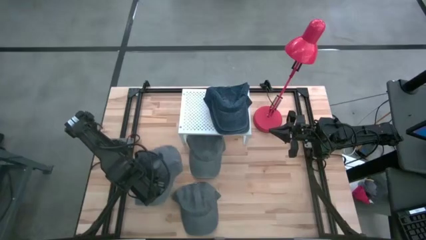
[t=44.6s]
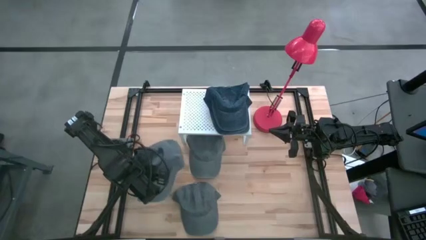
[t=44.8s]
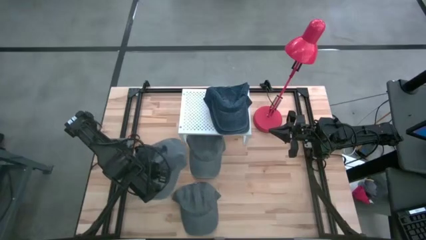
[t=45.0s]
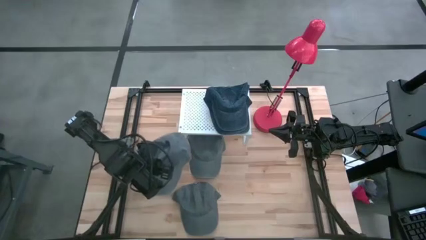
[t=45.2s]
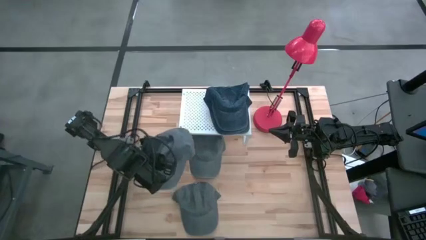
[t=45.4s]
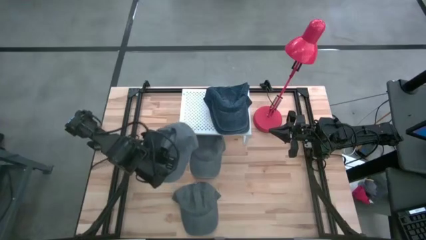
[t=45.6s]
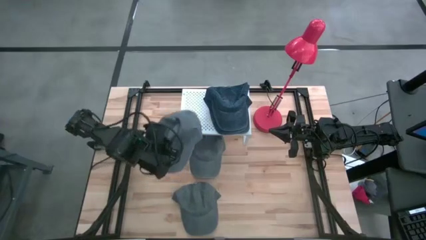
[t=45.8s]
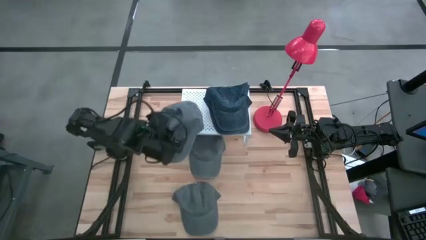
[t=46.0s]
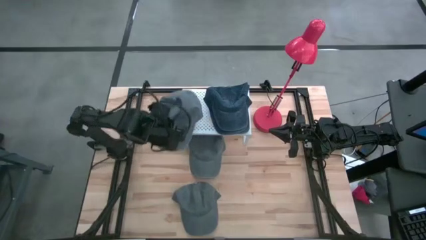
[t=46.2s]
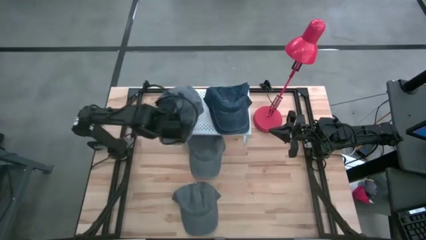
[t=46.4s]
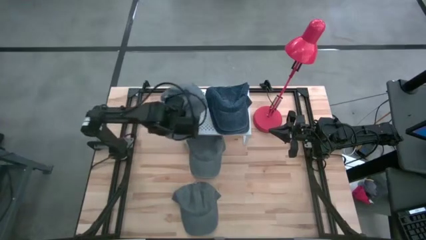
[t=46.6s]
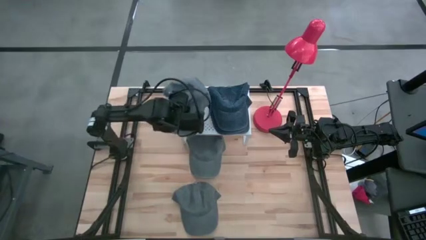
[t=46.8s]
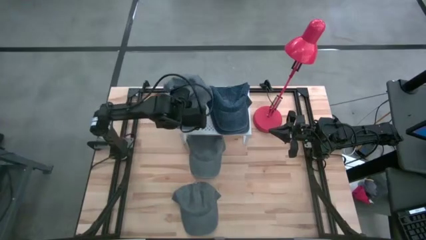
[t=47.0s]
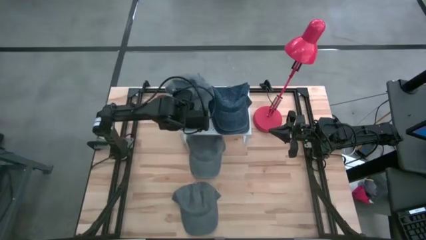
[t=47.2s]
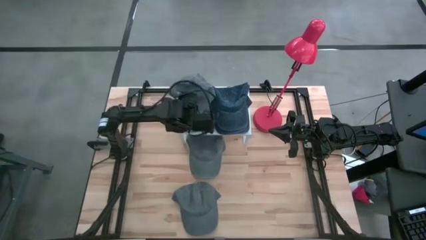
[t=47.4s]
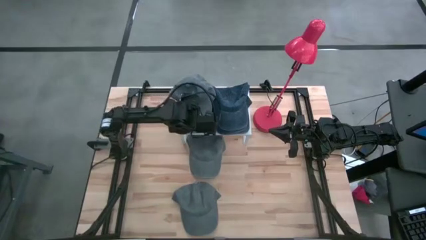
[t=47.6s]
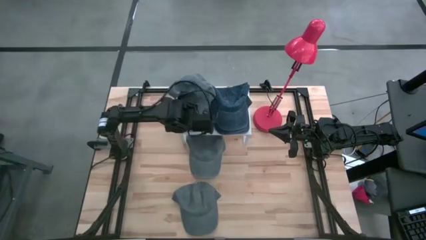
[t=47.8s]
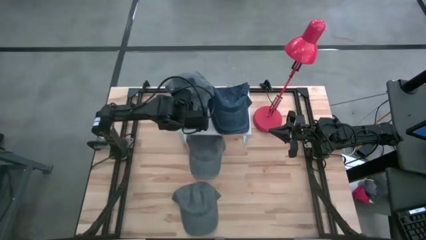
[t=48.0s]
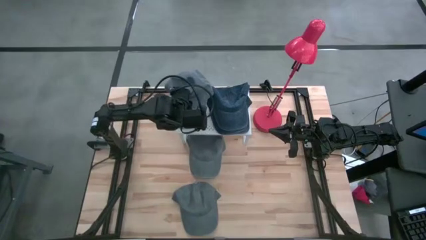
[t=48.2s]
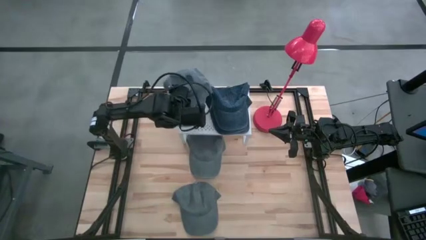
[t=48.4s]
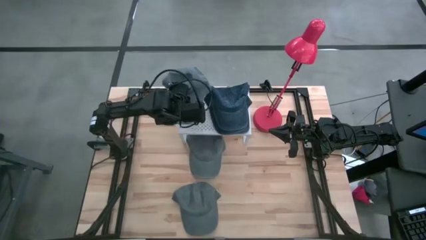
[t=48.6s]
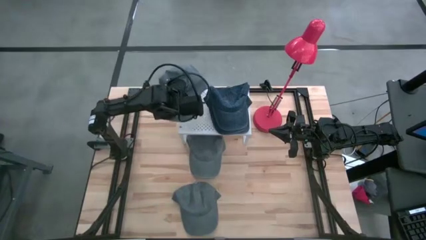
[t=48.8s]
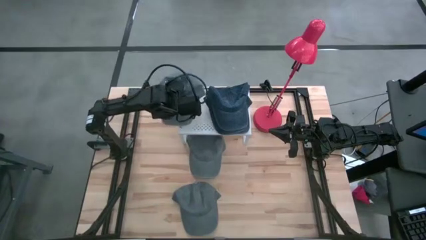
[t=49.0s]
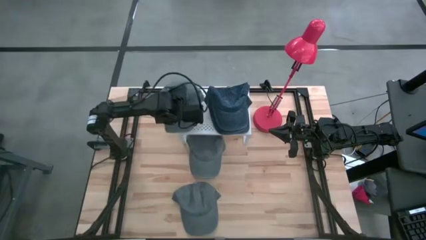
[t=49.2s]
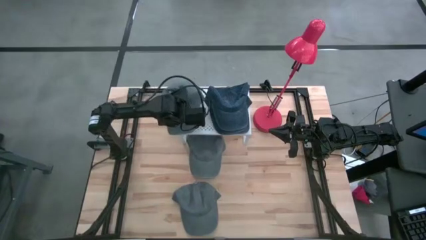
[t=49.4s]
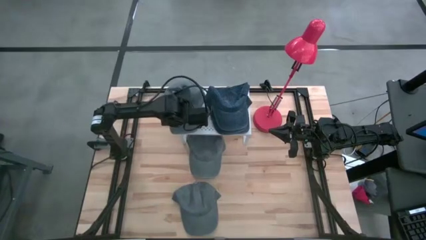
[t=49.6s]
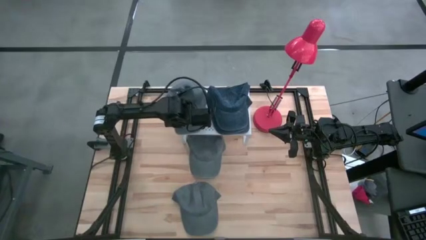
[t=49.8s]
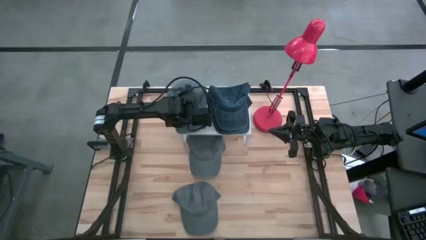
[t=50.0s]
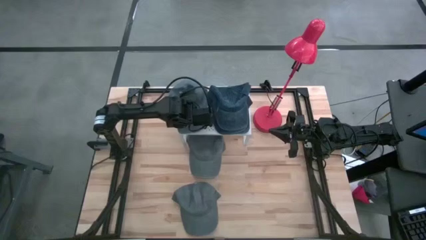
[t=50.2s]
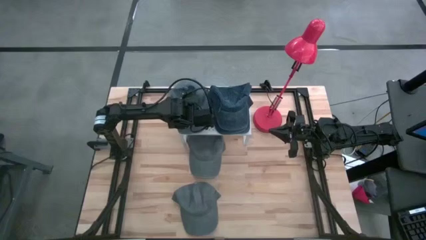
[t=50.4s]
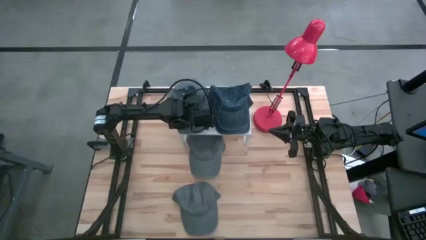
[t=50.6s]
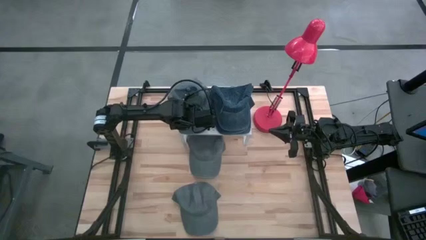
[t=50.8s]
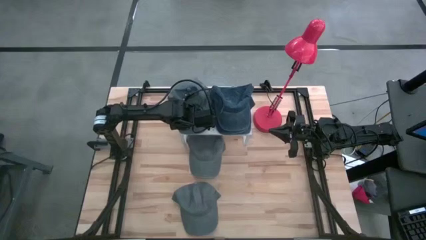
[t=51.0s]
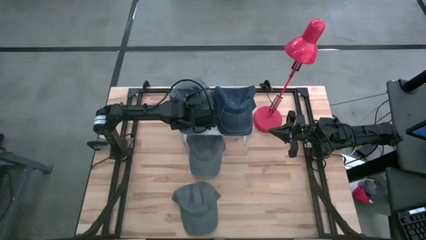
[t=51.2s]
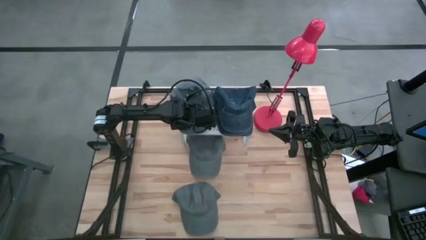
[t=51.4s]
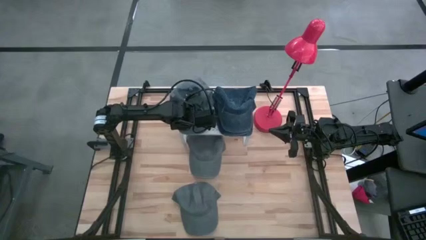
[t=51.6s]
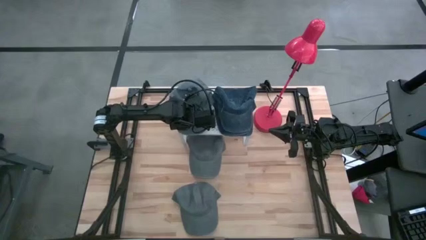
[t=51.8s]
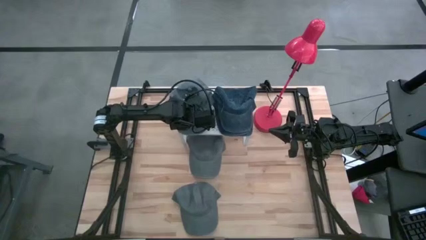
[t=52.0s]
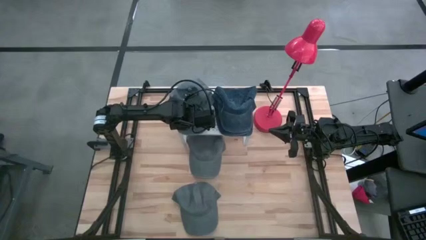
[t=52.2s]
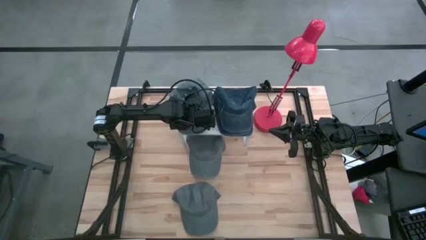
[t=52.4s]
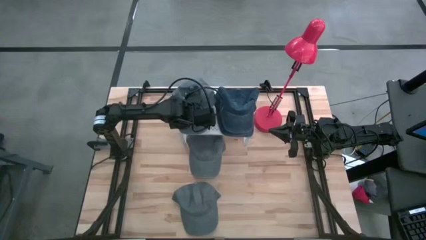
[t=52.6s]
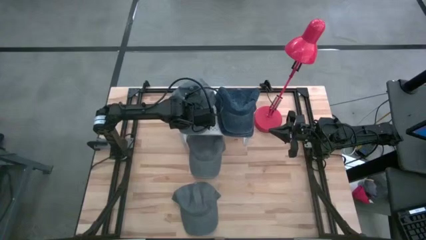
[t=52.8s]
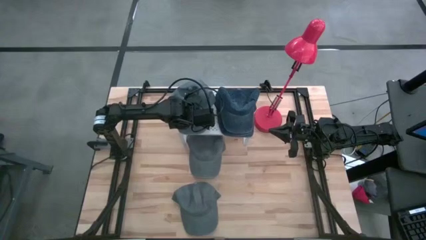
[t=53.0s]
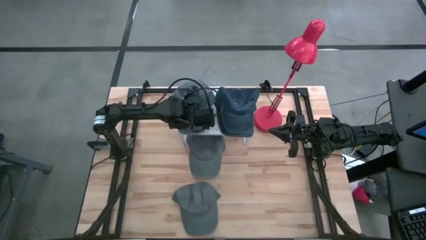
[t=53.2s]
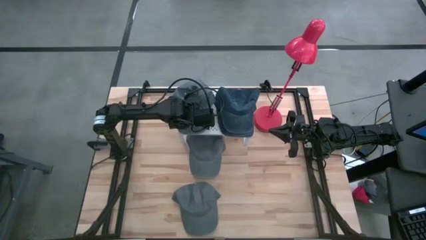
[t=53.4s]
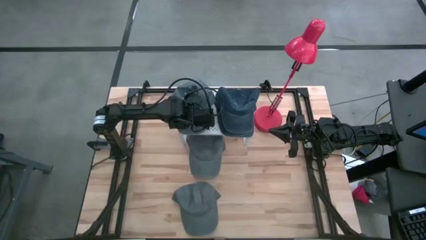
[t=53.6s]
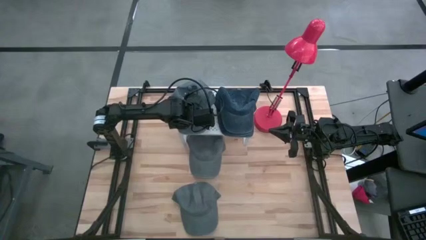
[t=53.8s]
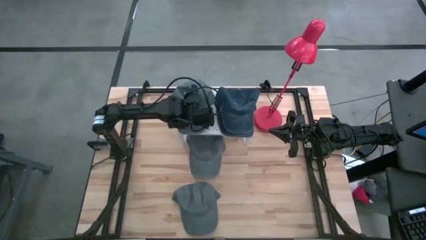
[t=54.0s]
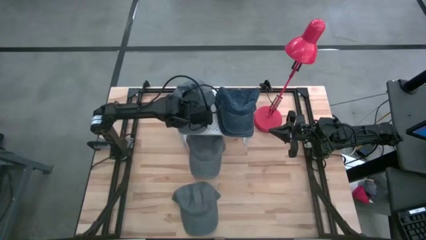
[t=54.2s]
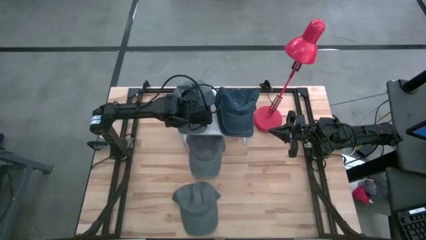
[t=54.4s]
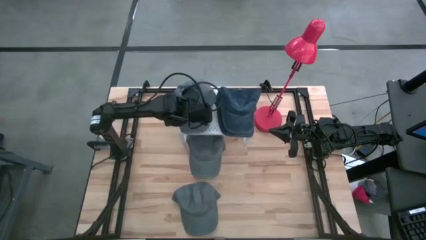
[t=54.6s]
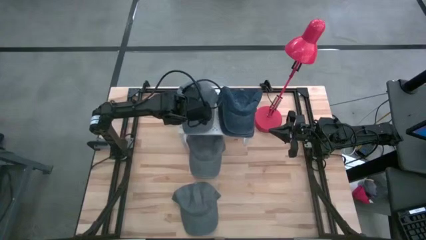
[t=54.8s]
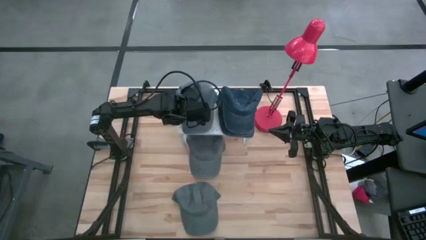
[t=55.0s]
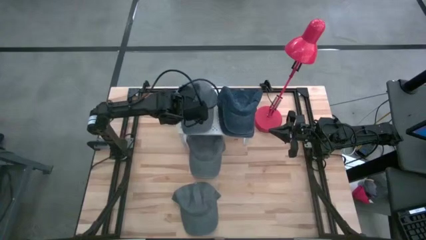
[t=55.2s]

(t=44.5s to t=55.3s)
Task: Pick & Place hat
Put the bottom left gray cap on the shelf

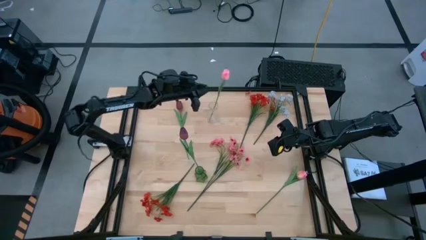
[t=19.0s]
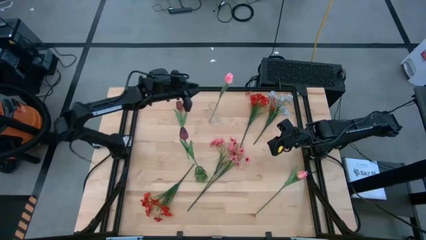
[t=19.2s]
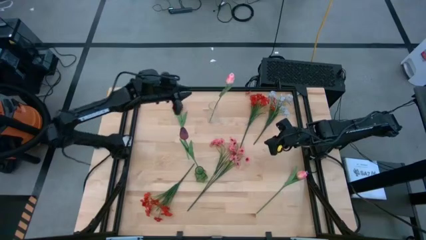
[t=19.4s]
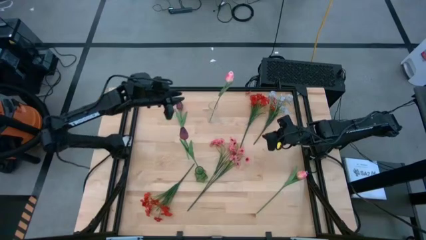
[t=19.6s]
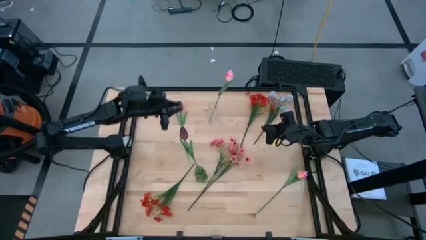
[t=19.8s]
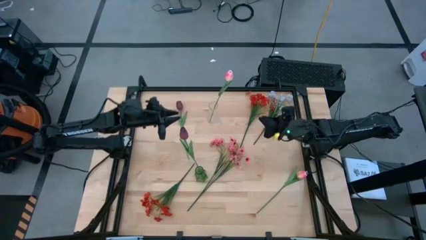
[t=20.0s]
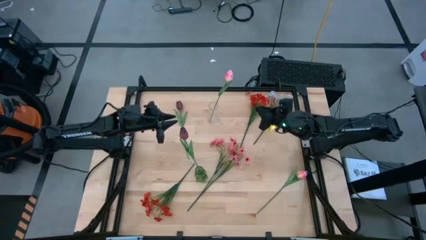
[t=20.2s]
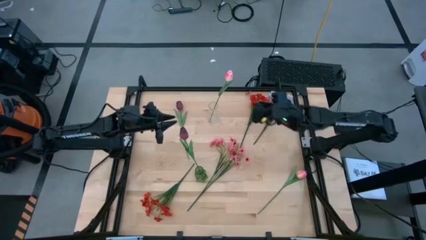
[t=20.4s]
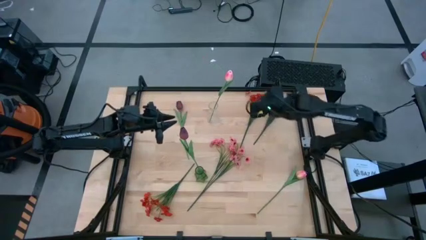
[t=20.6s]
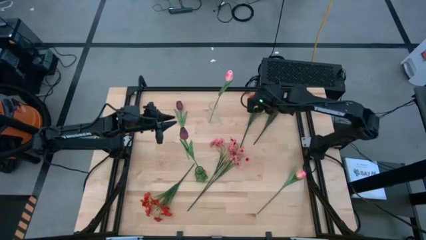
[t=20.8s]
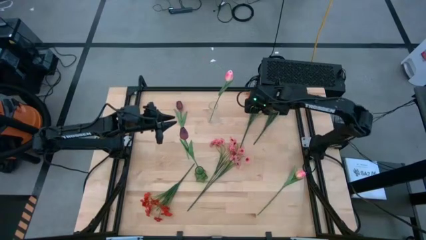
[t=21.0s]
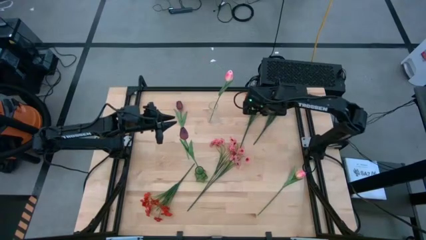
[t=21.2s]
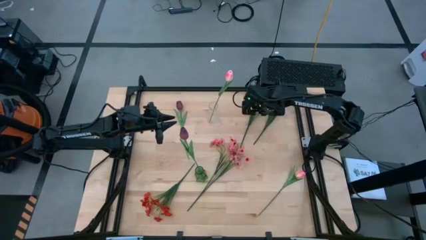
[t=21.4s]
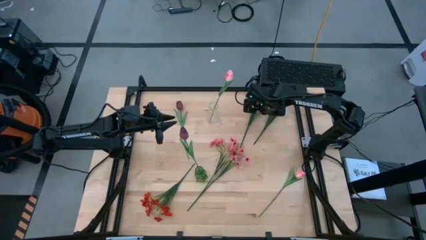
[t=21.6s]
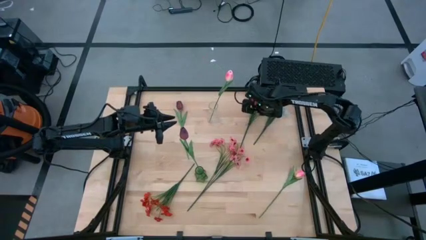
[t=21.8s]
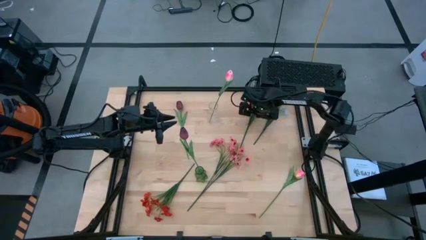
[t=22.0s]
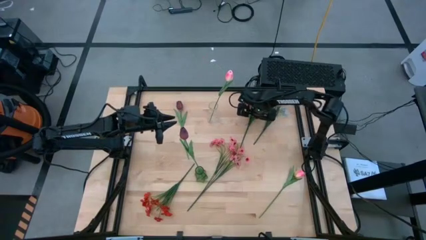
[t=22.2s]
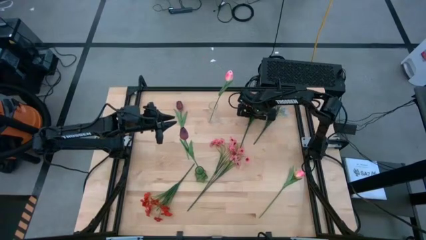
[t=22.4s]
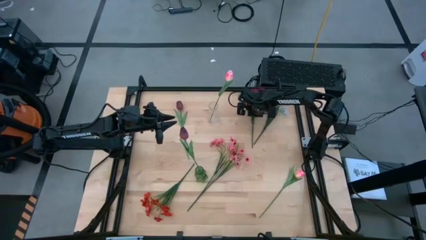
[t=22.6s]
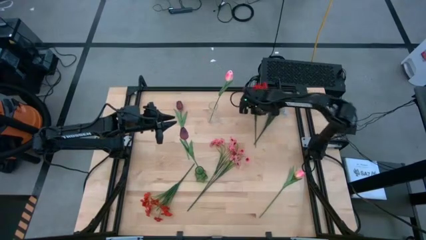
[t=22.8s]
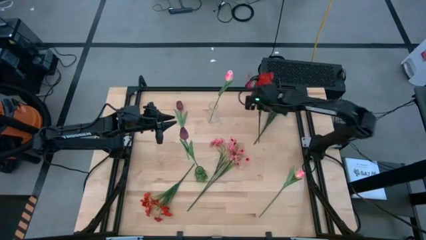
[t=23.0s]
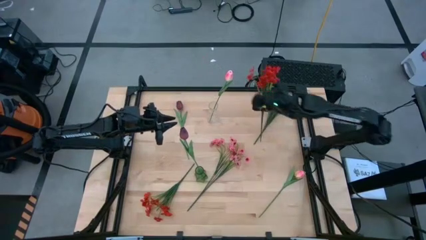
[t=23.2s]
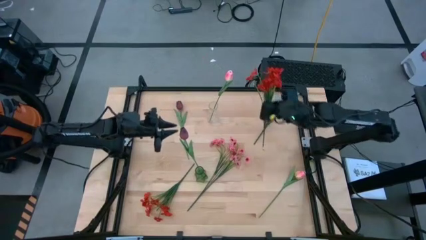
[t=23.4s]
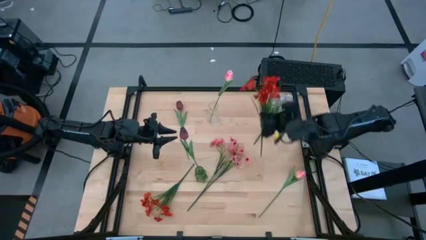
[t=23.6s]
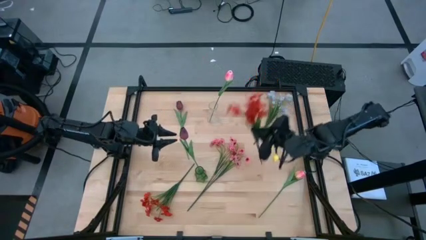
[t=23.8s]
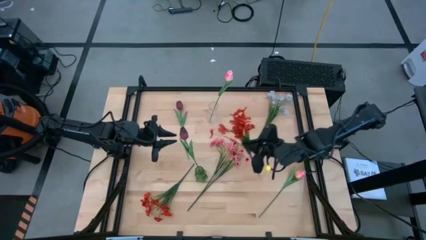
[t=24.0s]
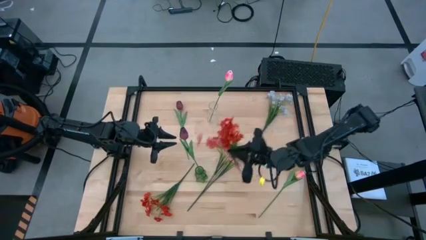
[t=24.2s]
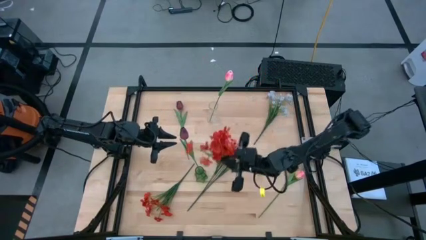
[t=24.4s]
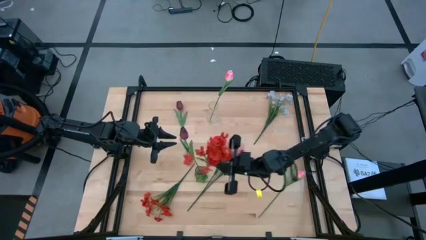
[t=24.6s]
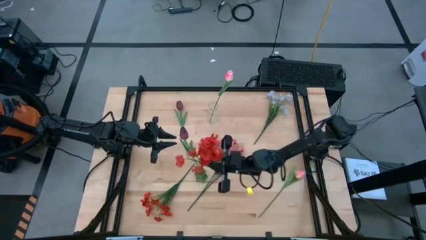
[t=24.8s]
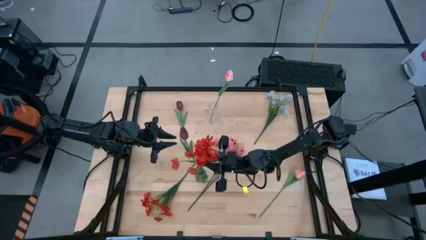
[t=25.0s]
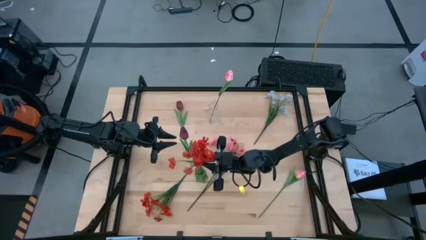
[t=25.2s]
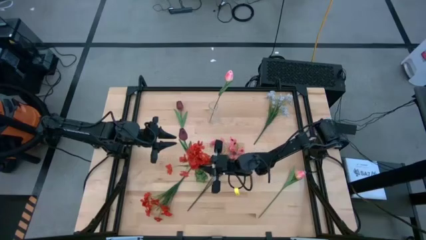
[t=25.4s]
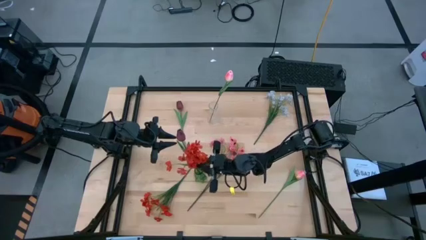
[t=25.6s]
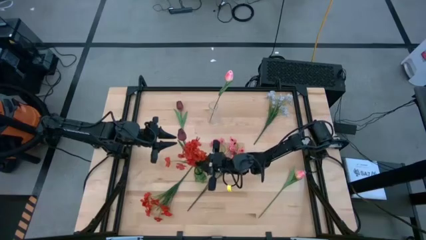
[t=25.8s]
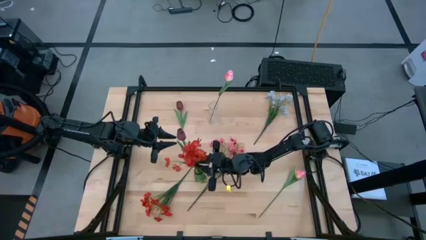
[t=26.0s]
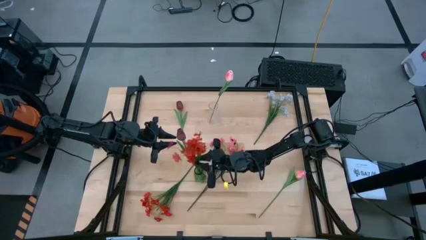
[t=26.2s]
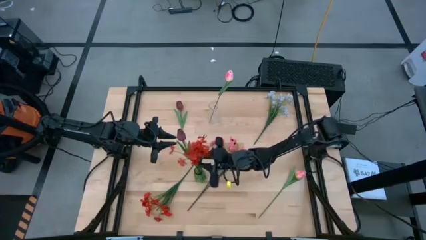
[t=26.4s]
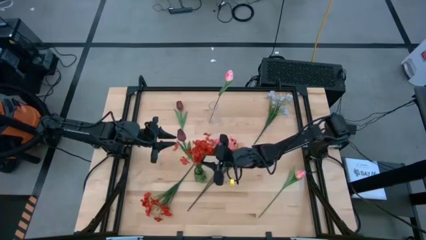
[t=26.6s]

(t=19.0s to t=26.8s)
Task: Sort flowers into vase by color
Put the top orange flowers into the green flower vase
